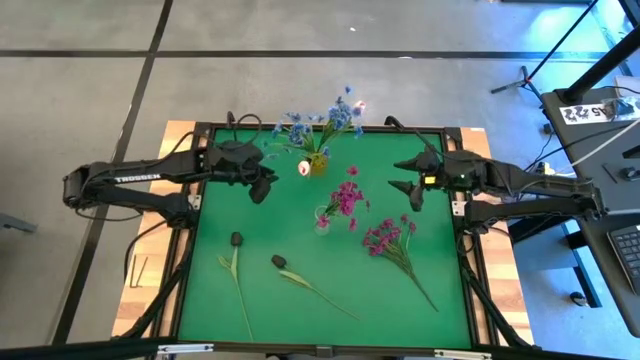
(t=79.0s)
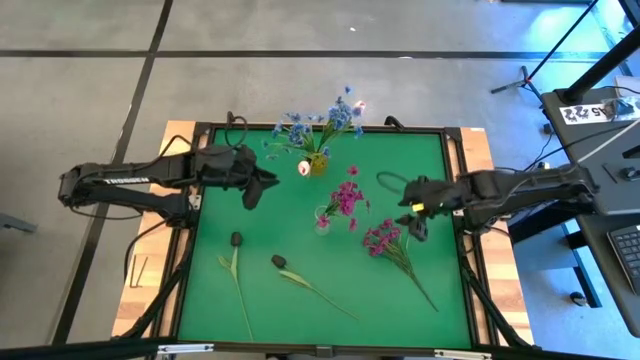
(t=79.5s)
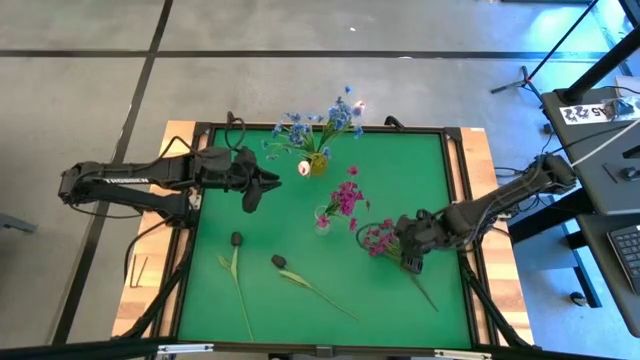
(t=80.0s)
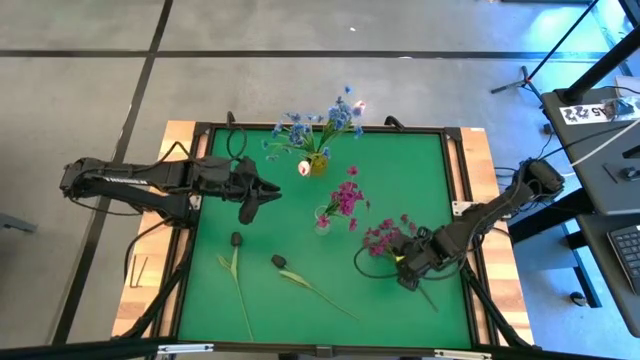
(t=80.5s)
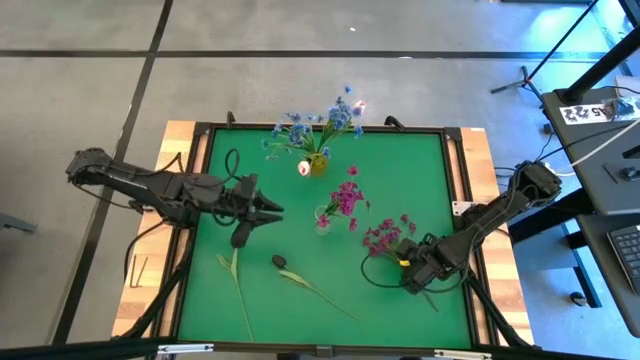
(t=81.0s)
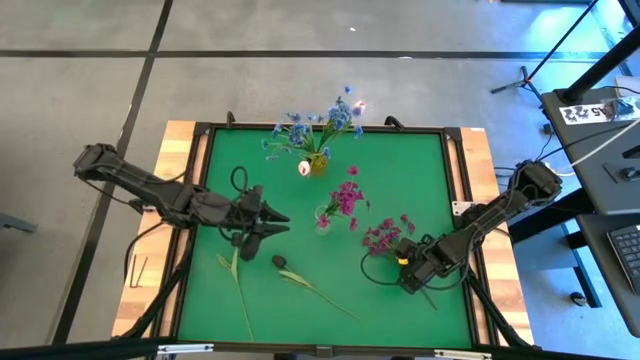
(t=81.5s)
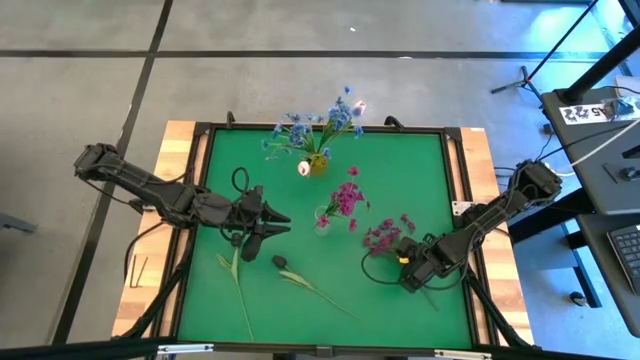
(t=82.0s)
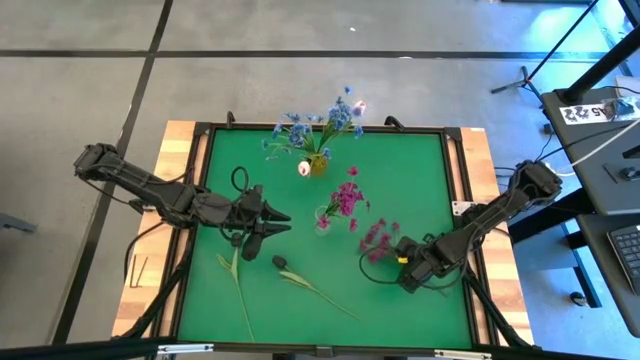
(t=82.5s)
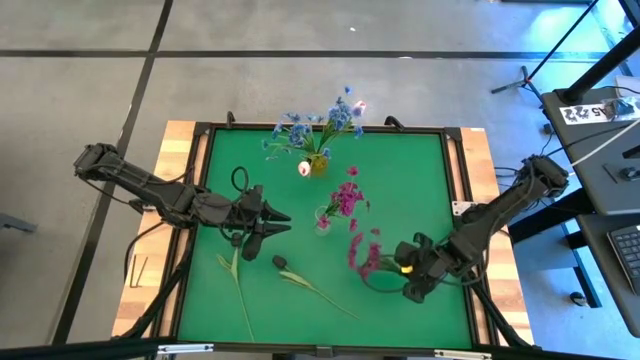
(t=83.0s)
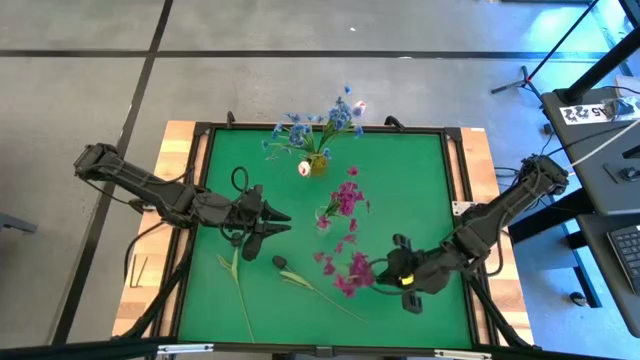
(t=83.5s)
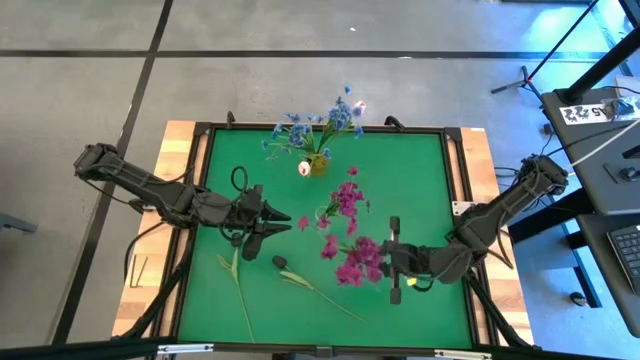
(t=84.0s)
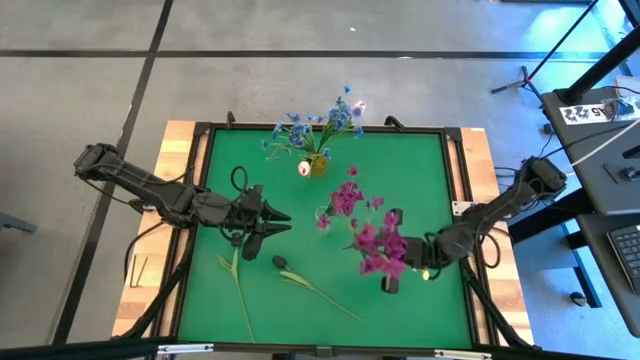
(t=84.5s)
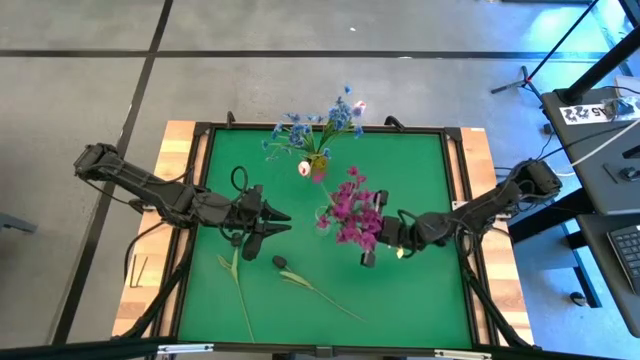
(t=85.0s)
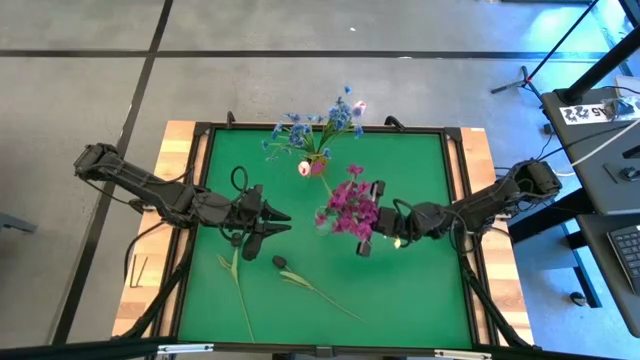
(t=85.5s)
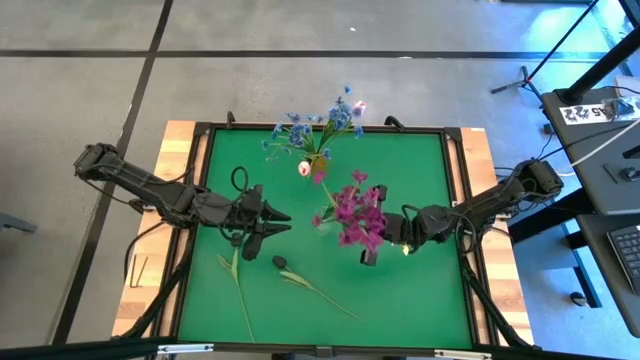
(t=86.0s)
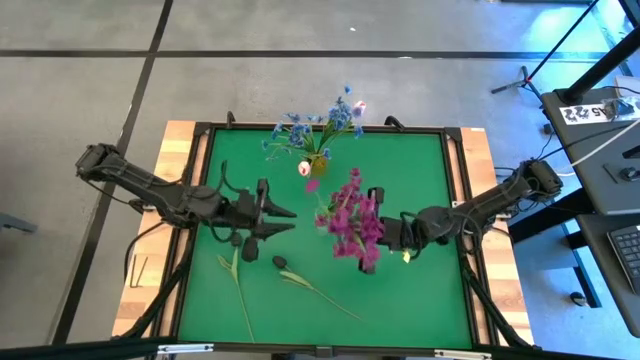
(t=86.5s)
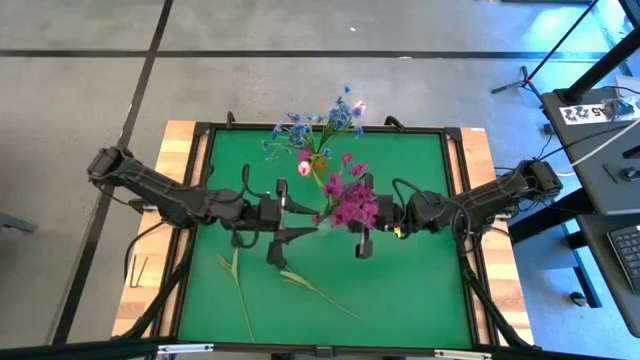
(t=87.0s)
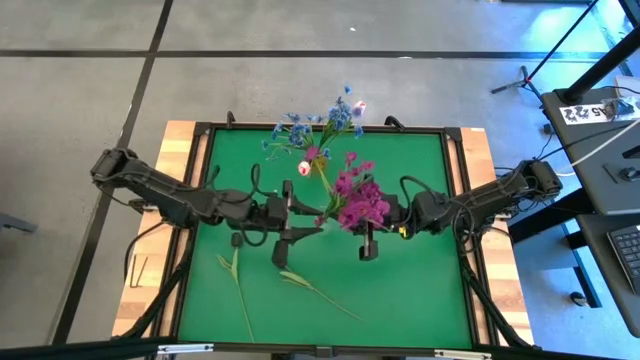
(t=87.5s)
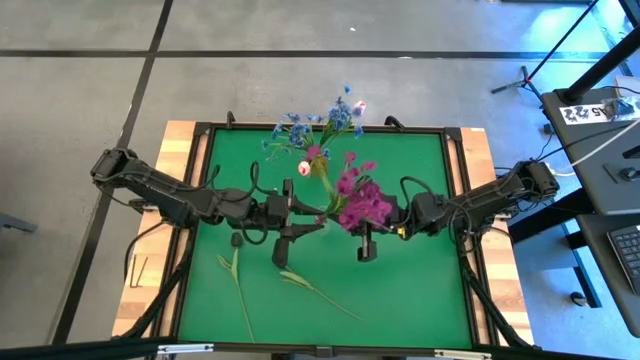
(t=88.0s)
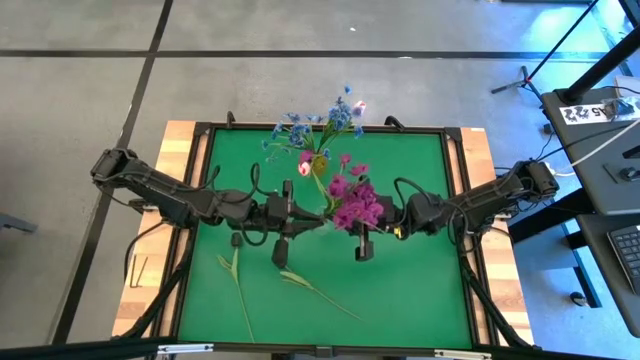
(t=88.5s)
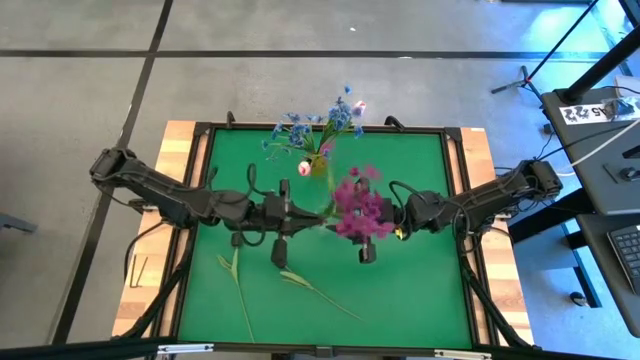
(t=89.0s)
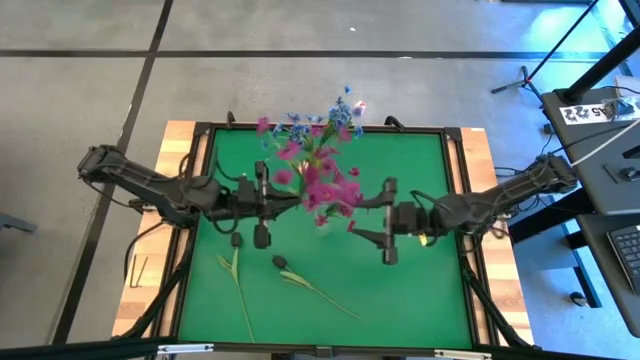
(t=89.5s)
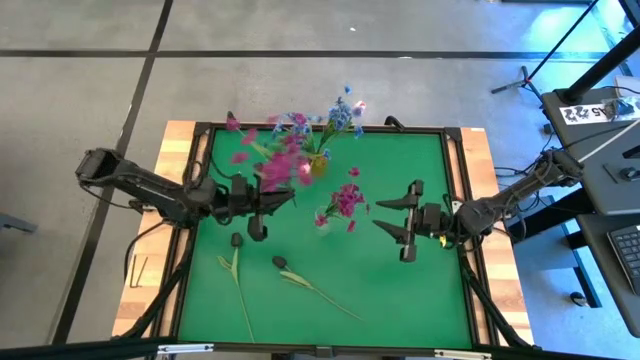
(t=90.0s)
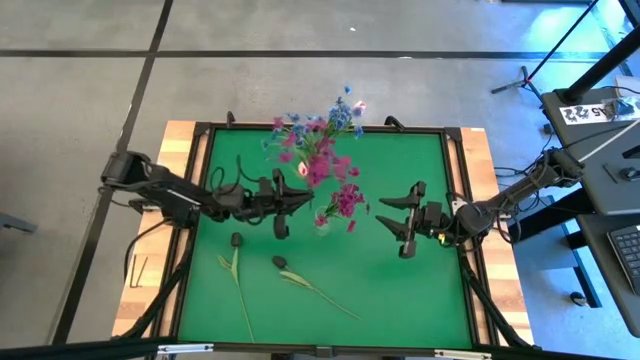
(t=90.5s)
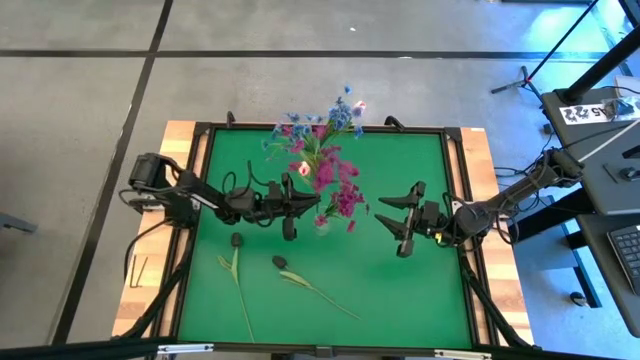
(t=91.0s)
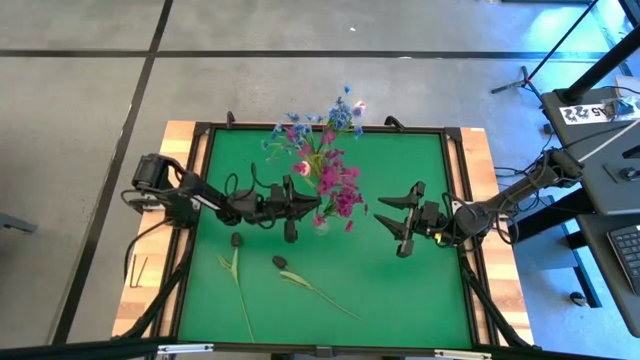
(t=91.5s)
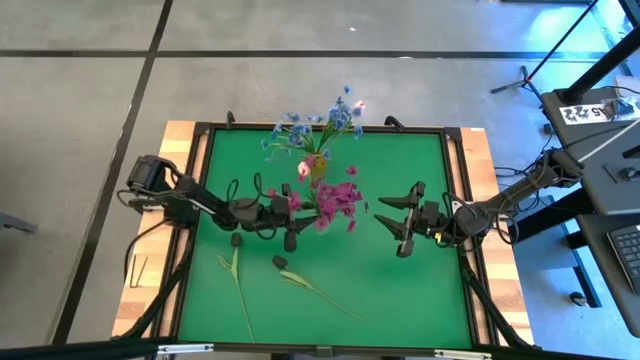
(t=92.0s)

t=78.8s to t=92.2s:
Task: Sort flowers into vase by color
Put the purple flowers into the transparent vase

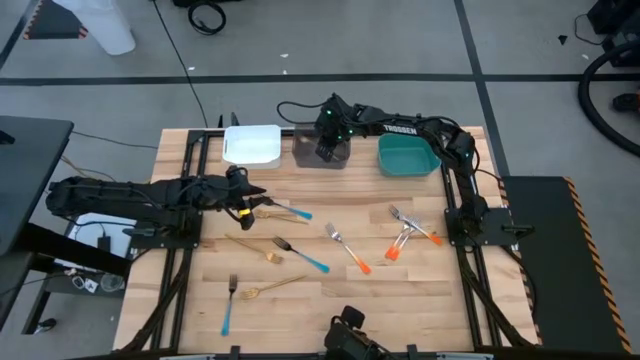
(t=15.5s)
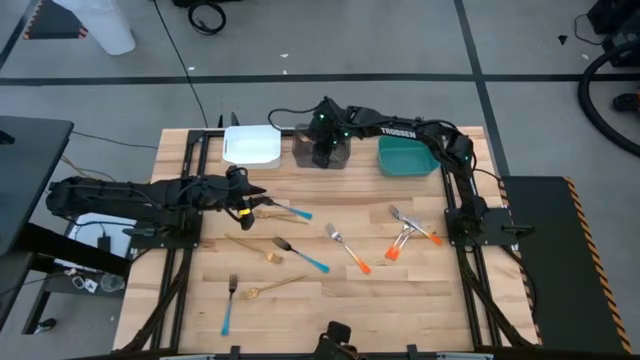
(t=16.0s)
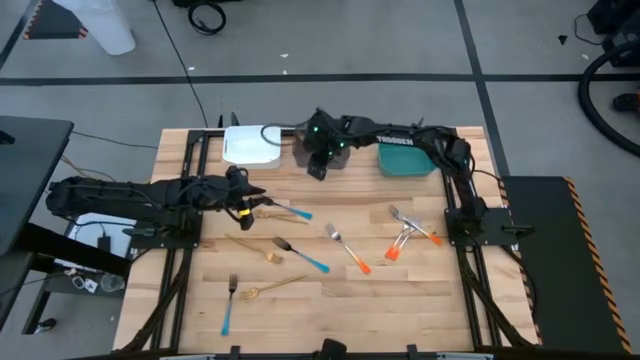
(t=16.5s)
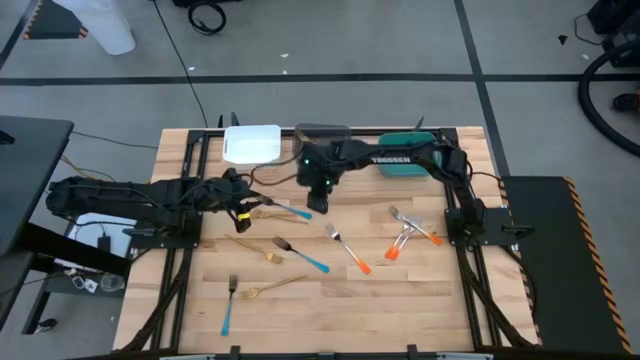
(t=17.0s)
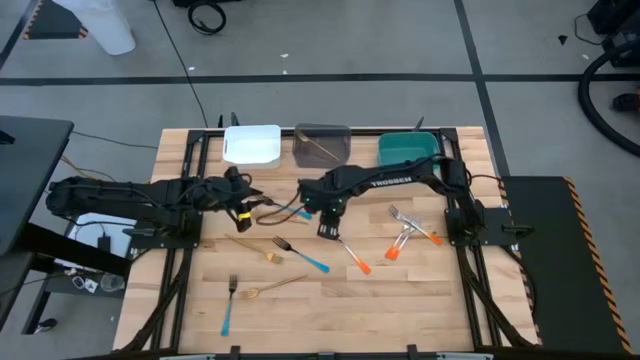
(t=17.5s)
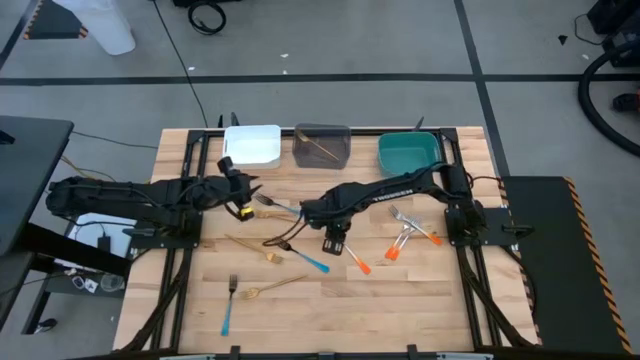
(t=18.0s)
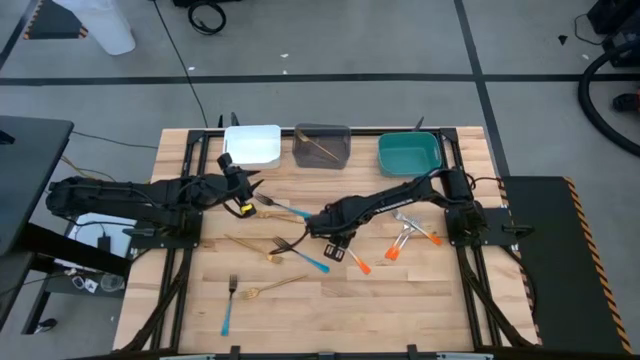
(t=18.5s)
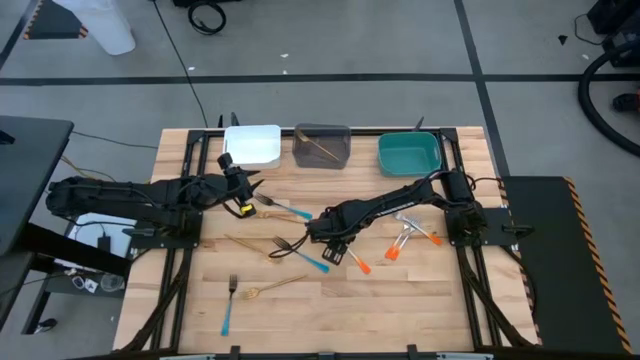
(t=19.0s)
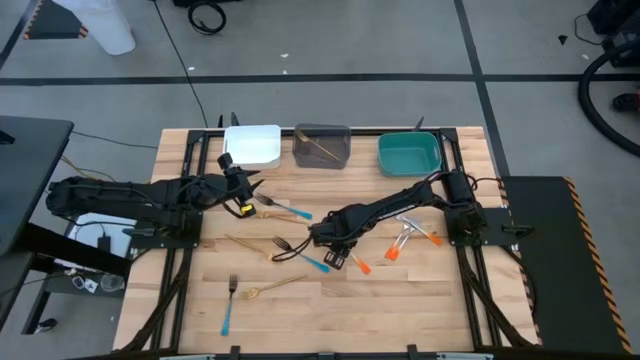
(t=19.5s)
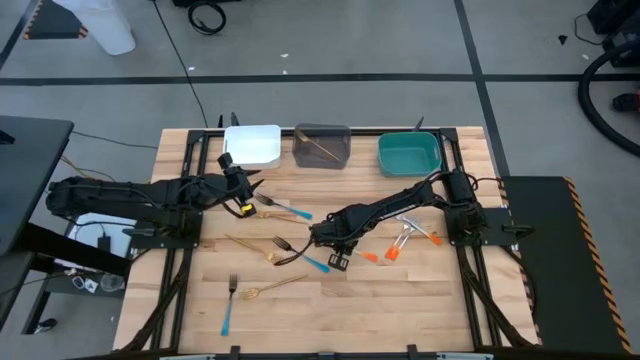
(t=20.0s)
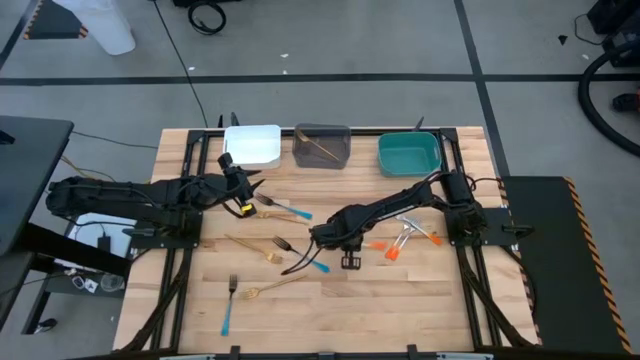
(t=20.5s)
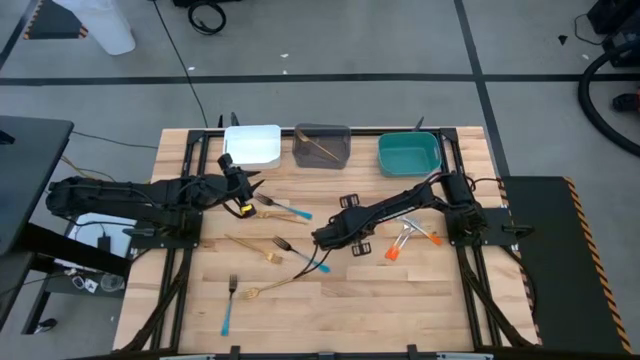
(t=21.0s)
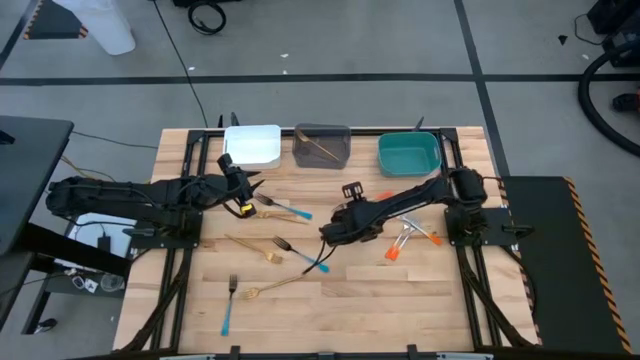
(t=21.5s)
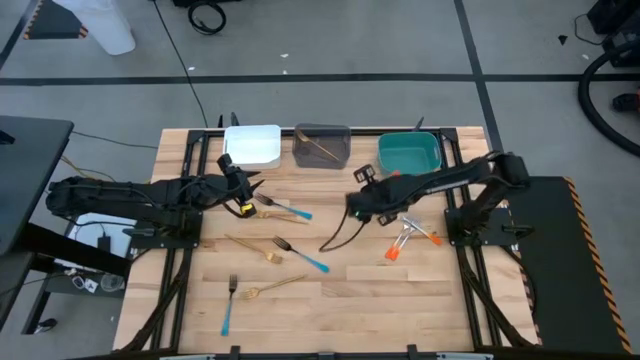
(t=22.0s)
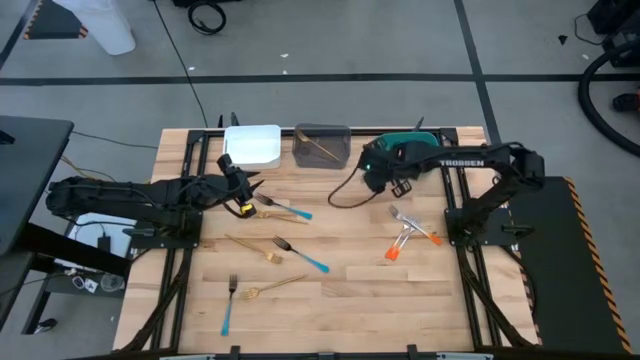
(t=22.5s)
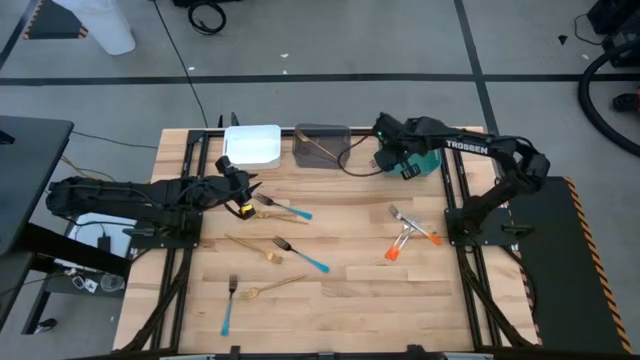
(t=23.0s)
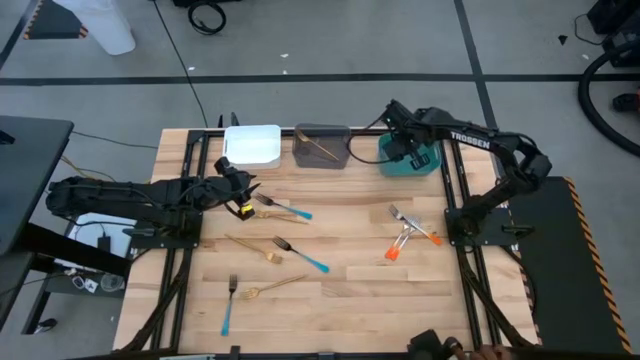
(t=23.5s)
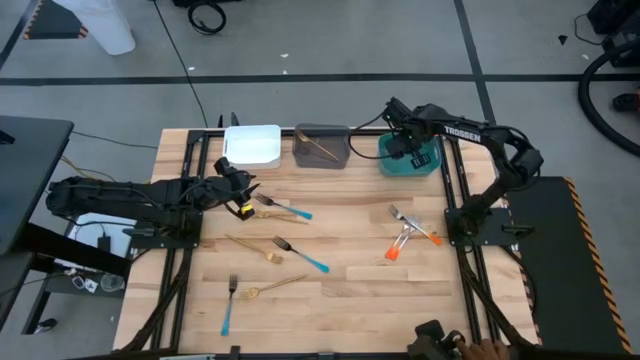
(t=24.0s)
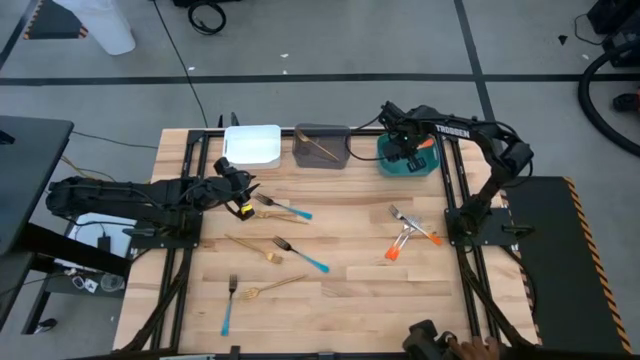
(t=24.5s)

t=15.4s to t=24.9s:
Task: Sort silverware by color (type)
Put the bottom orange fork into the green bin
